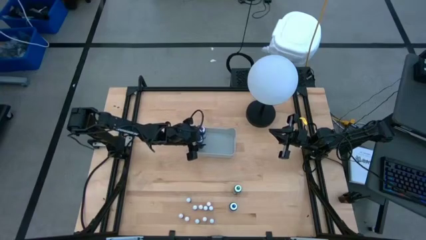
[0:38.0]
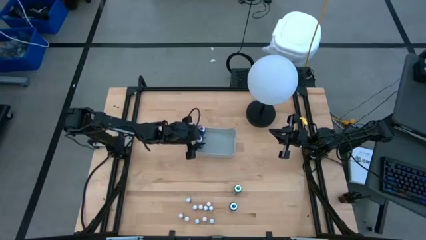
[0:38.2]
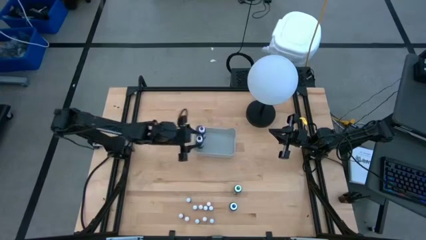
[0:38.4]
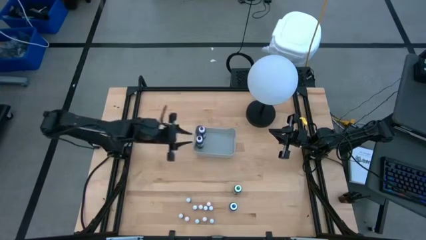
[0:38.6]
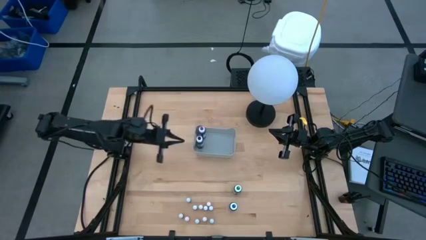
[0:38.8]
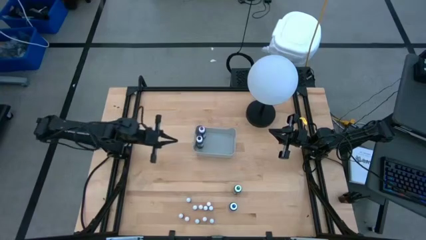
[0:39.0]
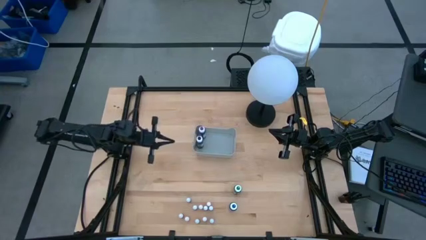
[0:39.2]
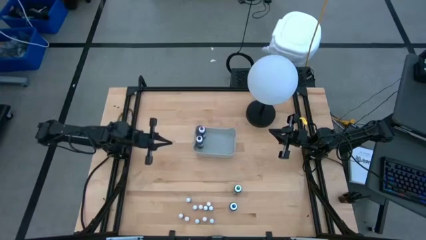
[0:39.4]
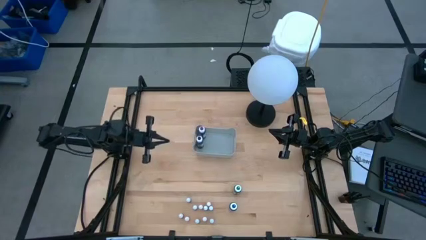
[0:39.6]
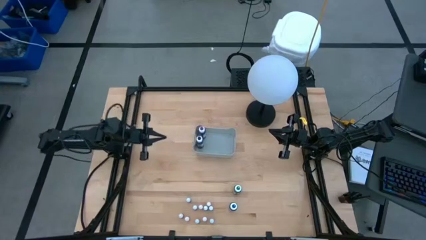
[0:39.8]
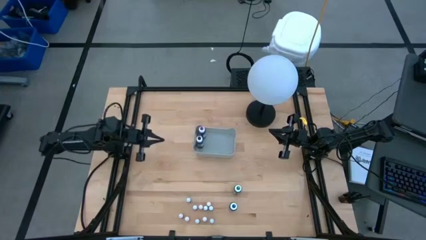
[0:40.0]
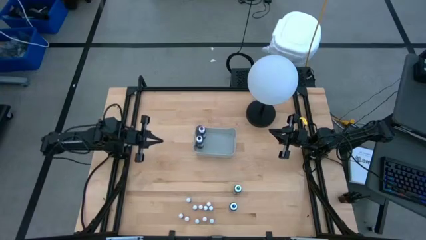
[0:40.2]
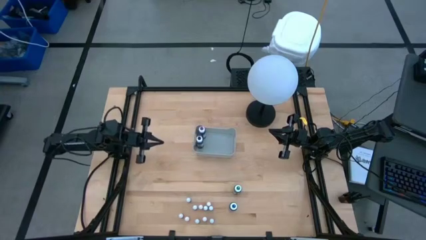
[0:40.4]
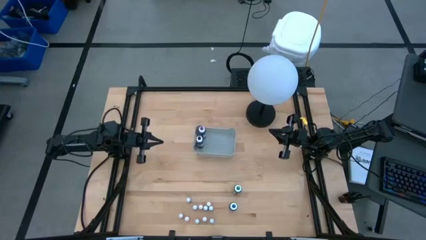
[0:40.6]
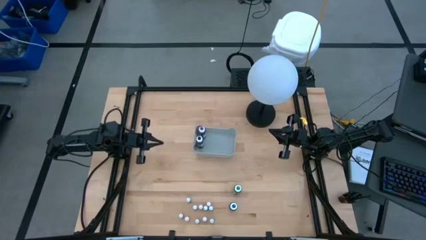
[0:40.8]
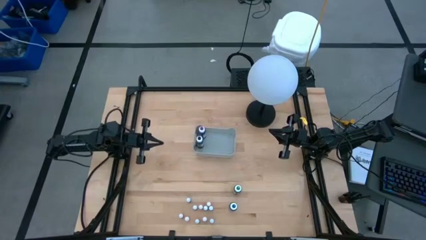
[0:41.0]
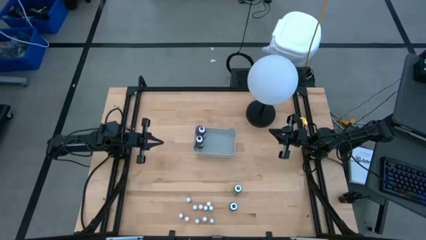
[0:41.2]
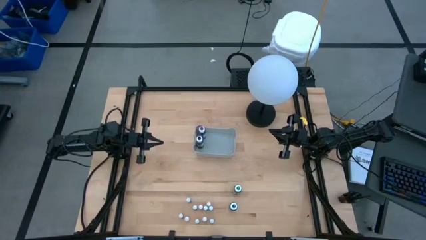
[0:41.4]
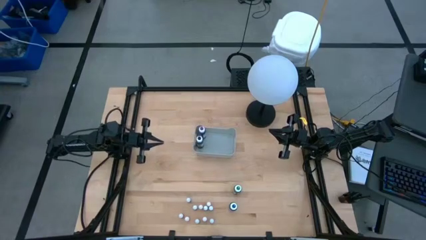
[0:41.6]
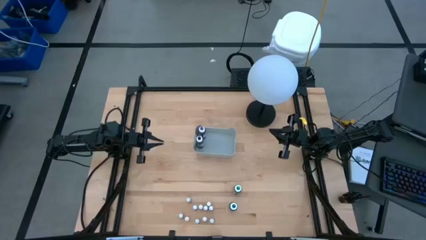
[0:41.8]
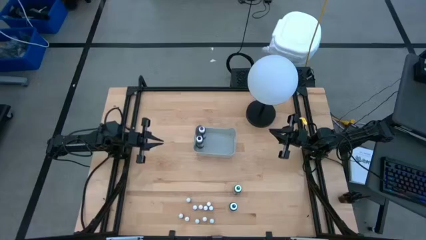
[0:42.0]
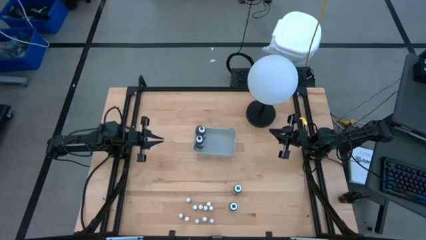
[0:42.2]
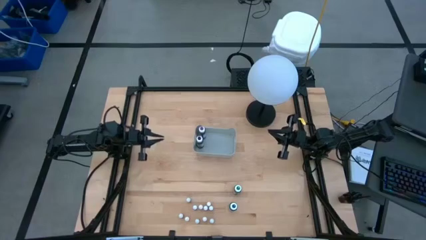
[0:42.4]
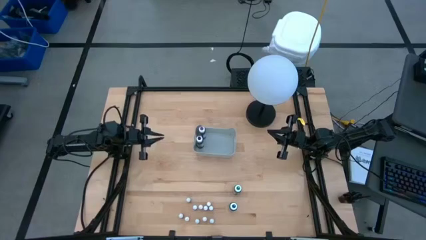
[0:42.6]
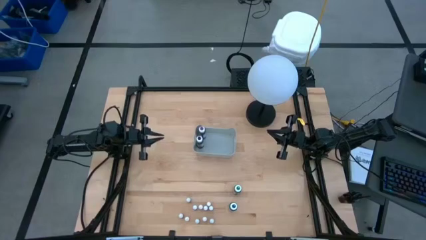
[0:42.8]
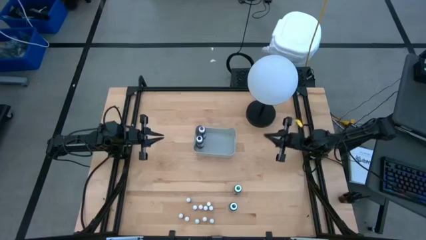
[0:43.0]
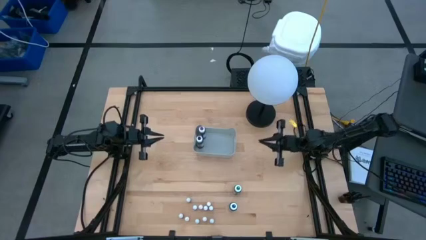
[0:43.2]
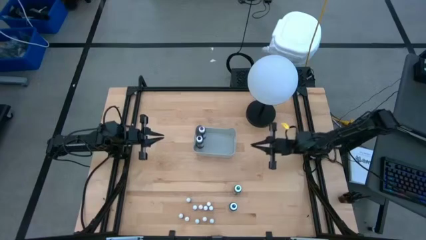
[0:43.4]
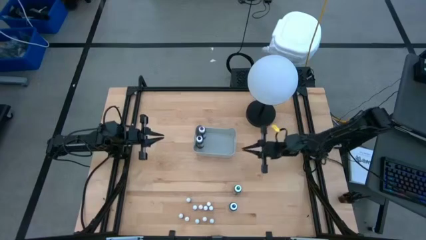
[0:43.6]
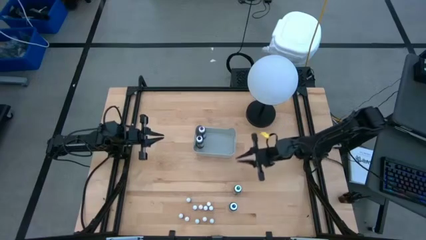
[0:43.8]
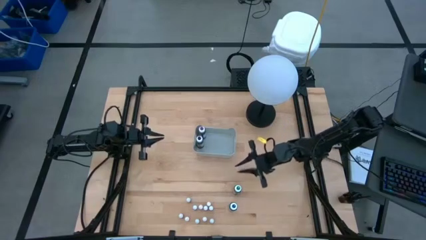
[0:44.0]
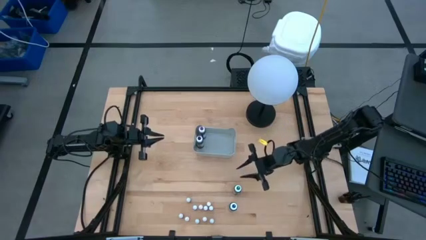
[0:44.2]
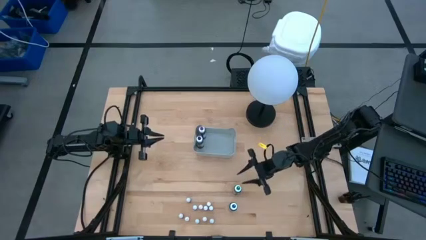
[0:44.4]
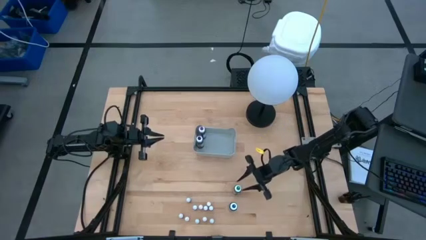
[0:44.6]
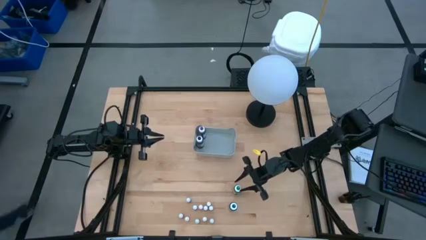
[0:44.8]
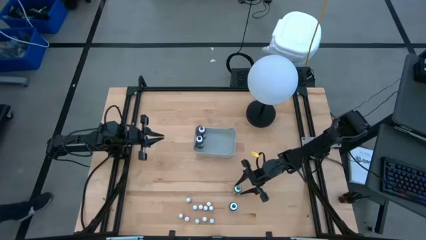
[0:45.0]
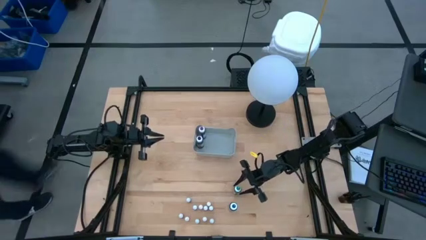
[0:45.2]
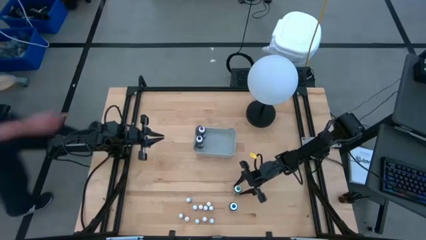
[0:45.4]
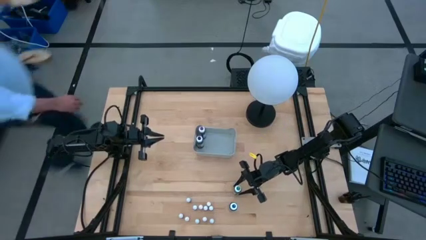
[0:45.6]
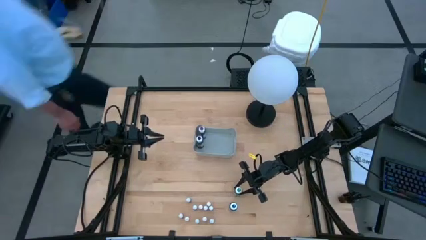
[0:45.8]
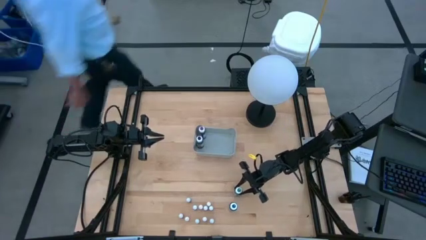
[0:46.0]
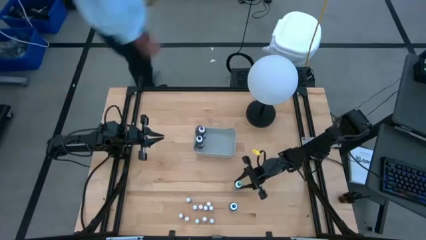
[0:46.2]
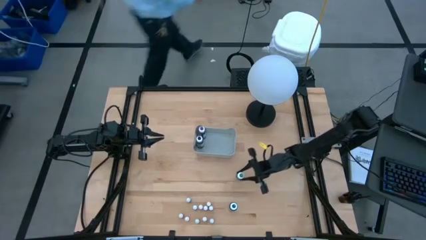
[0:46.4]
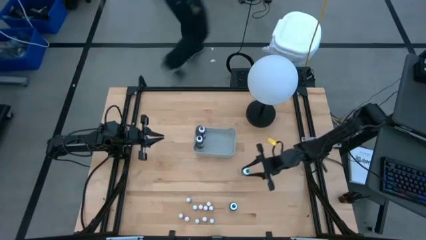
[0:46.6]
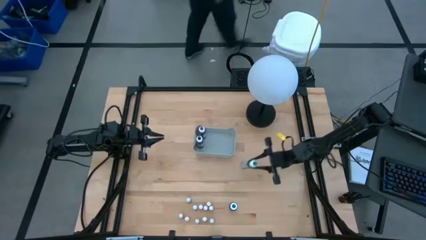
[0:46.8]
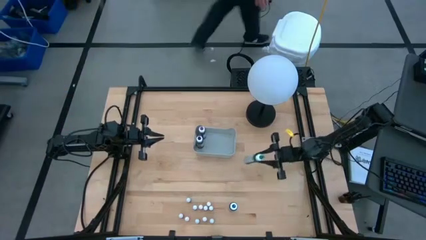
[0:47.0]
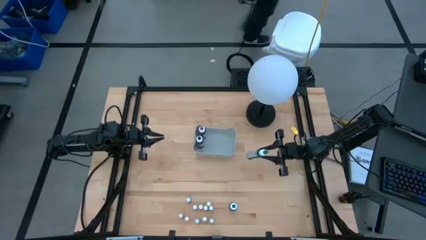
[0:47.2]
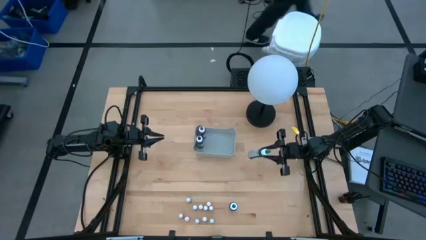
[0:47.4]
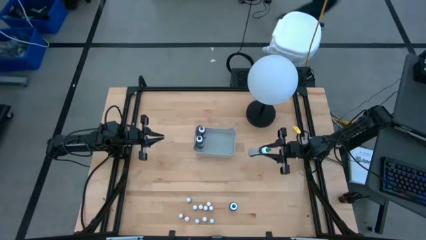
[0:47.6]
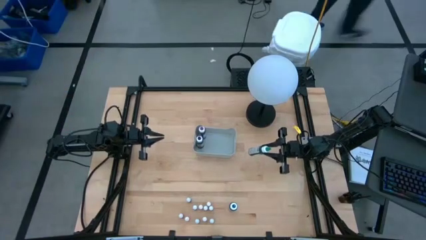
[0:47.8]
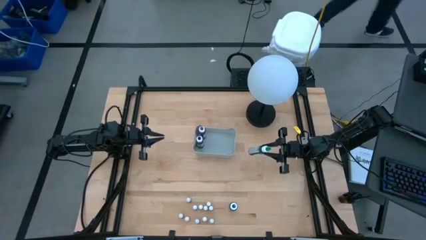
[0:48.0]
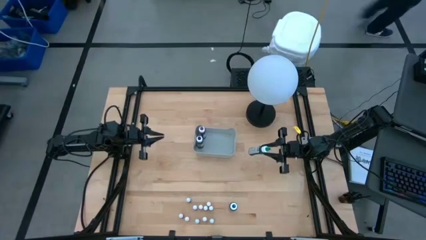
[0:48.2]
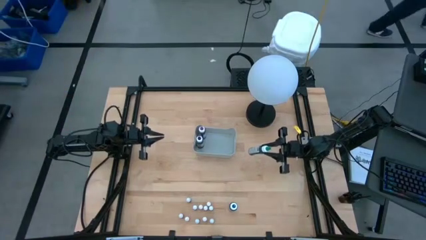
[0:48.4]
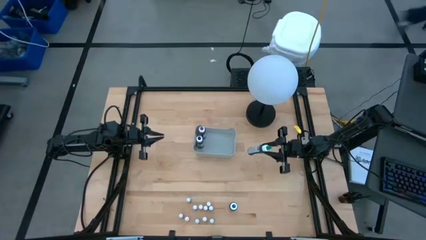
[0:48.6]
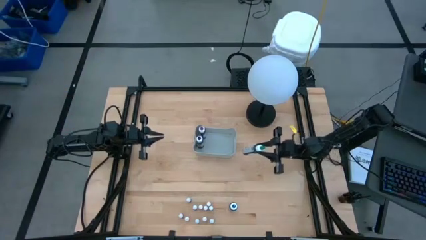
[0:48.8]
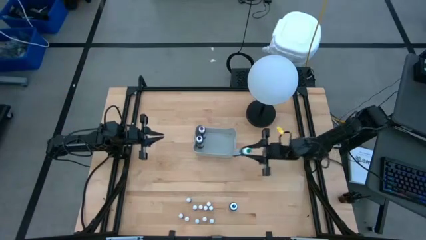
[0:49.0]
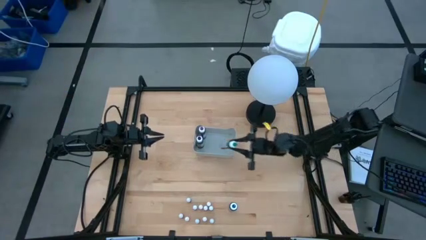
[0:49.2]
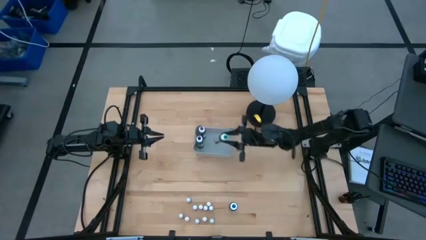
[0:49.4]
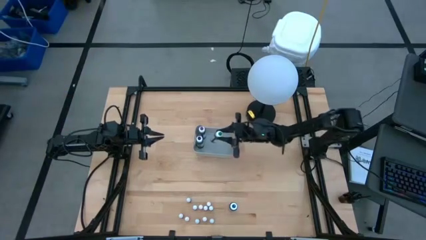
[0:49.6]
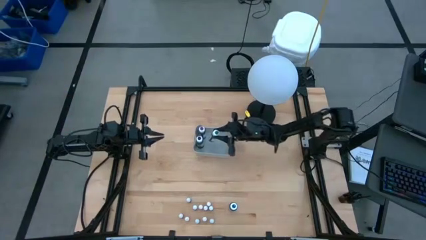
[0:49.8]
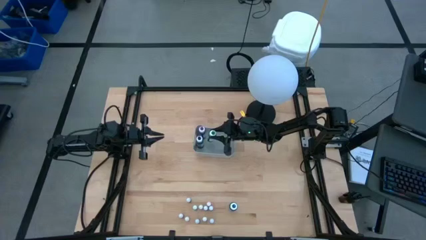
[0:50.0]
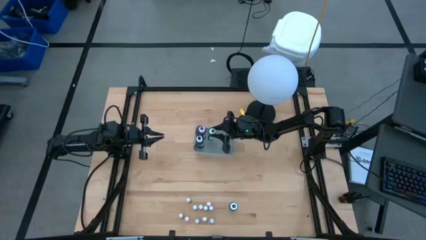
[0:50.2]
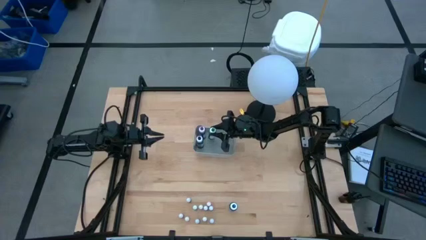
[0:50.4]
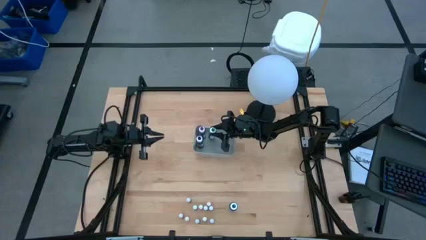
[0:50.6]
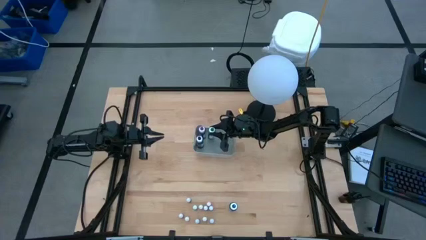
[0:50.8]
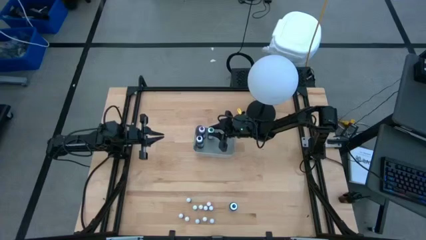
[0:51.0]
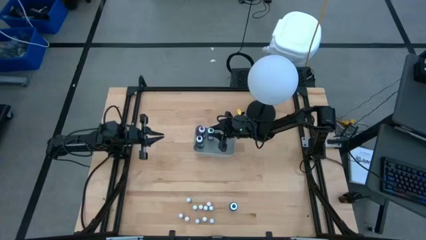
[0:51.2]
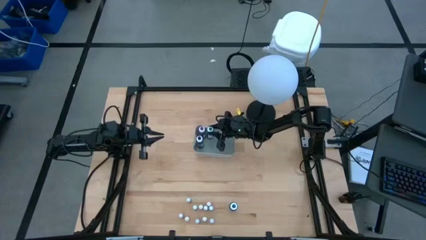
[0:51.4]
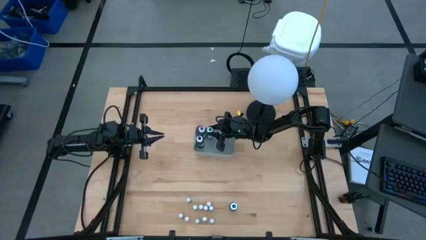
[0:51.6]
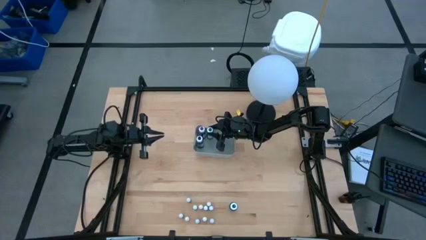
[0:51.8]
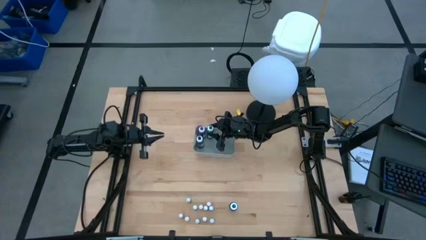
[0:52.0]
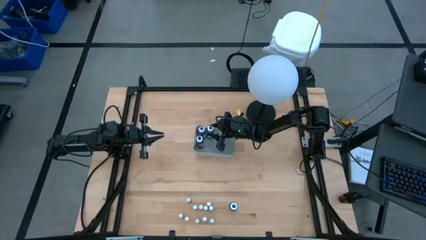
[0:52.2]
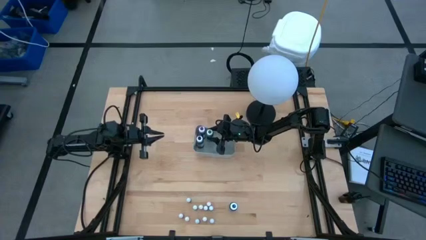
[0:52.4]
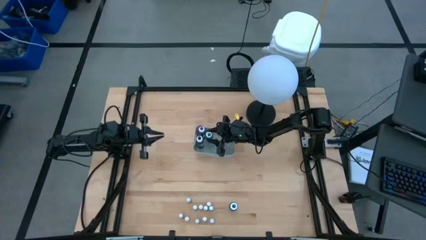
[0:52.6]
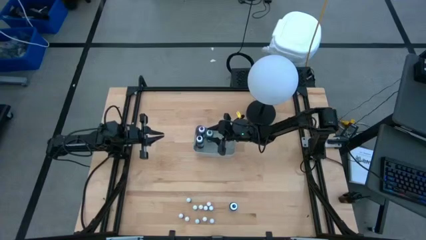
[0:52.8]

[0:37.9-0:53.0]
Task: Pick & Place food coloring
Put the large green food coloring bottle into the gray bin

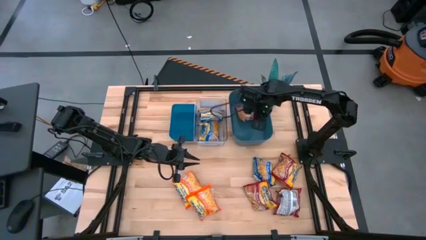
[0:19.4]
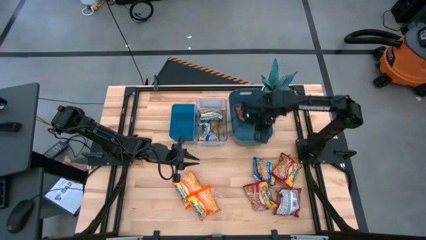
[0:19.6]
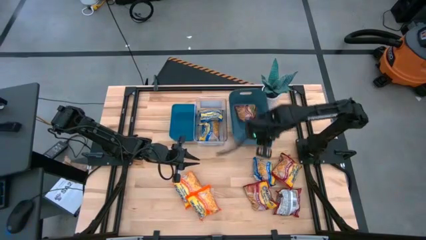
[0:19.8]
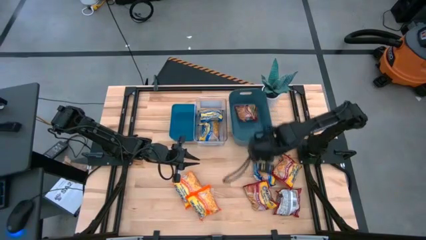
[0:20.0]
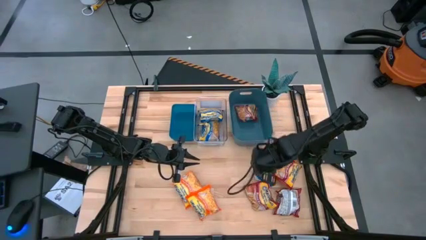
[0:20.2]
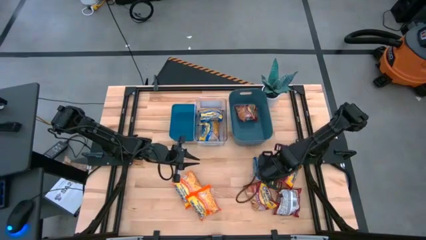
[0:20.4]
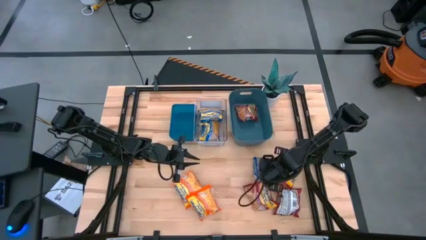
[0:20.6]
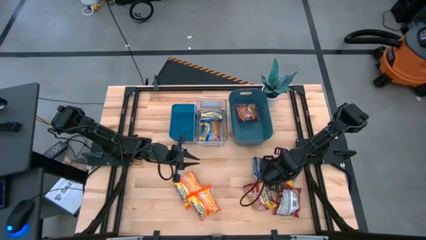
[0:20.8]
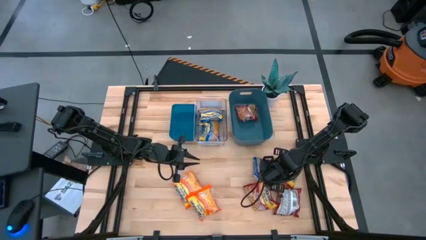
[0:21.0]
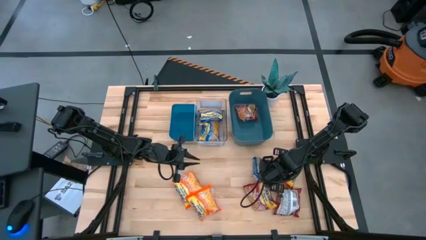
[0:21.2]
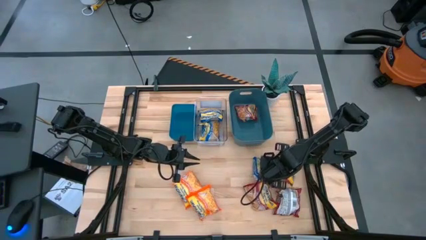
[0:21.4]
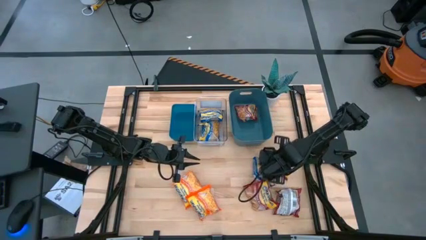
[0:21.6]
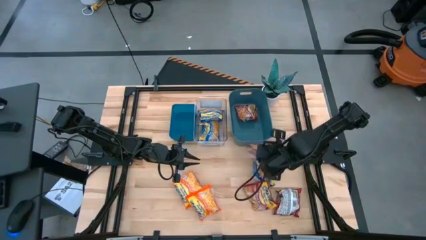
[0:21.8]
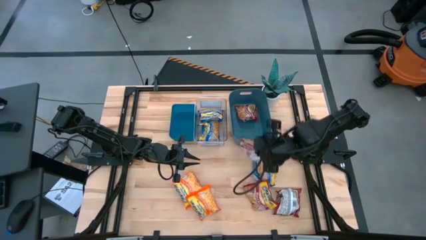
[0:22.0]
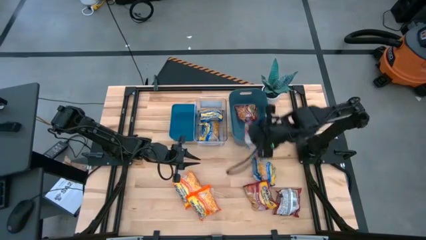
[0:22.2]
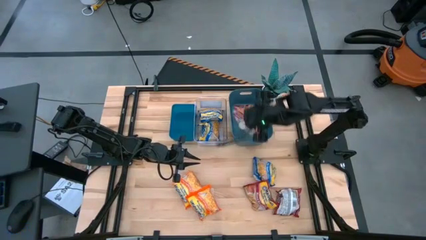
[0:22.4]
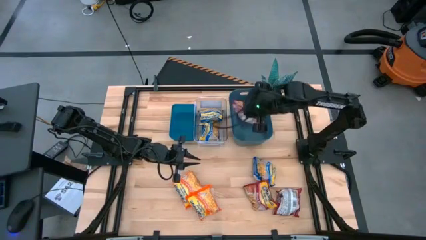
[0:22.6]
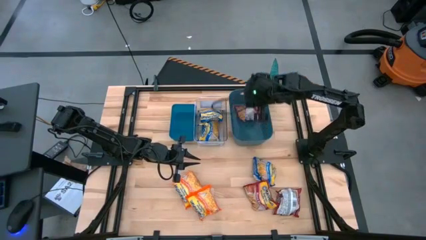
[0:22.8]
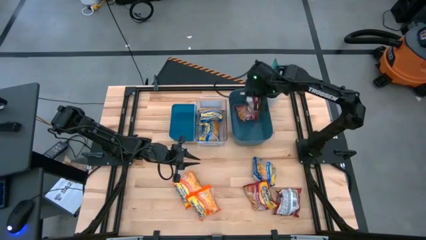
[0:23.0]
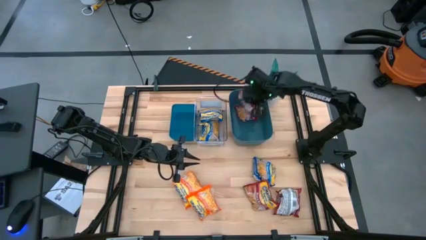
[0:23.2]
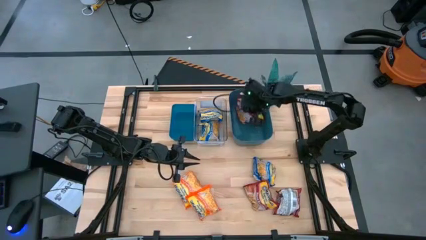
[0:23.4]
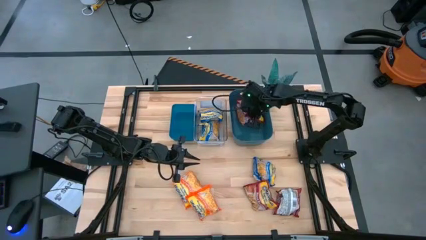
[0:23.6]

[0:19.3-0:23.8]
Task: Sort Maruchan noodles
Put the red noodle pack into the dark blue bin
